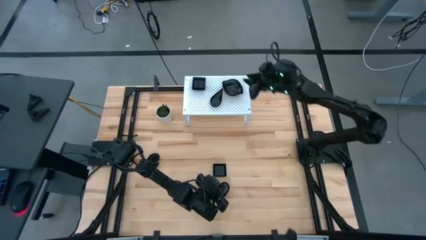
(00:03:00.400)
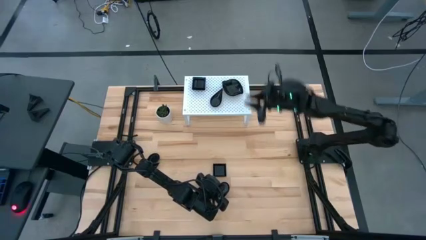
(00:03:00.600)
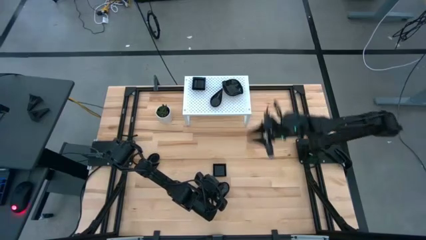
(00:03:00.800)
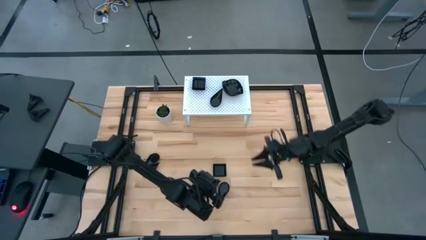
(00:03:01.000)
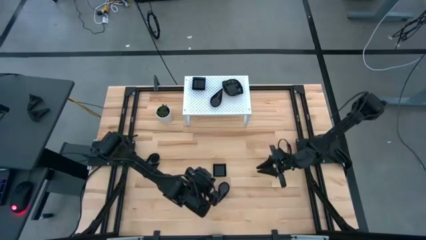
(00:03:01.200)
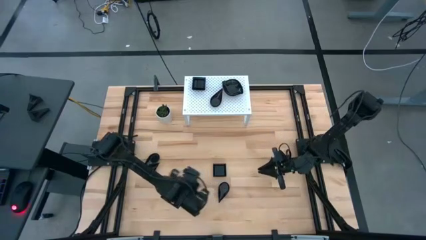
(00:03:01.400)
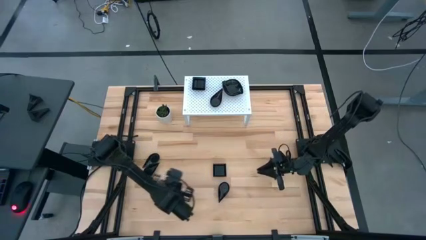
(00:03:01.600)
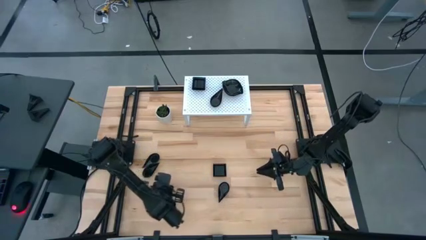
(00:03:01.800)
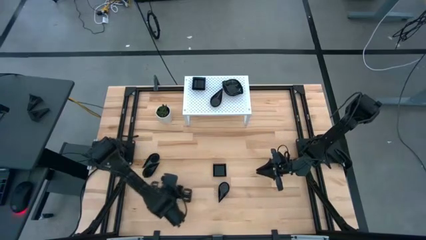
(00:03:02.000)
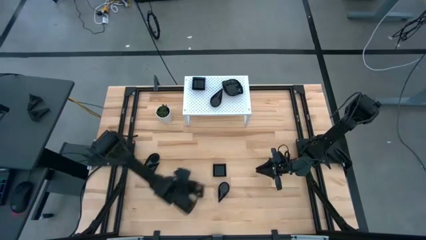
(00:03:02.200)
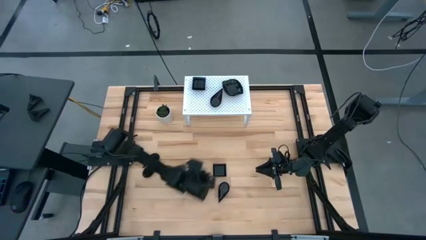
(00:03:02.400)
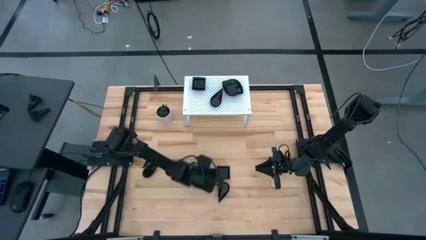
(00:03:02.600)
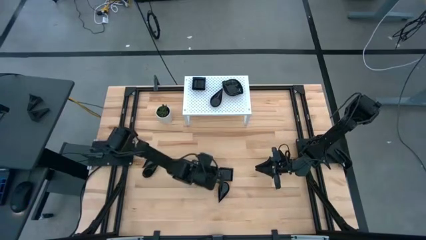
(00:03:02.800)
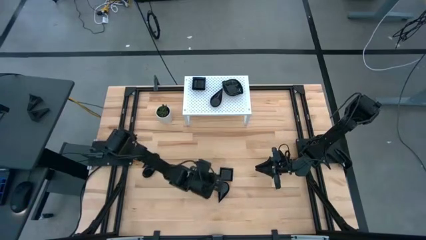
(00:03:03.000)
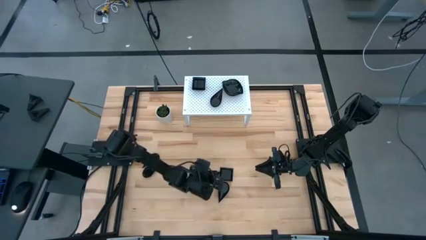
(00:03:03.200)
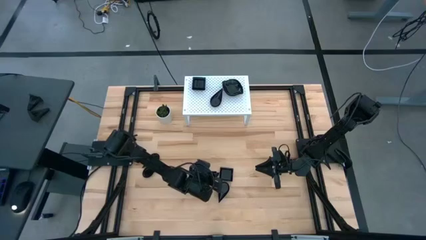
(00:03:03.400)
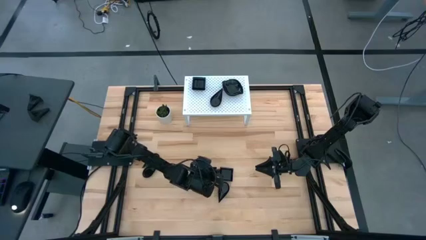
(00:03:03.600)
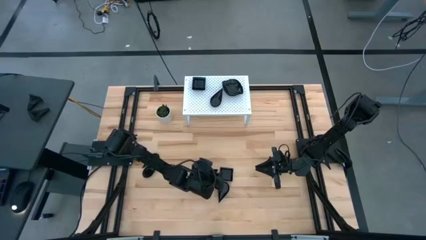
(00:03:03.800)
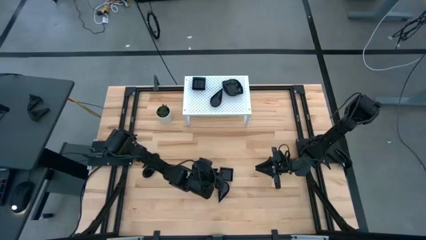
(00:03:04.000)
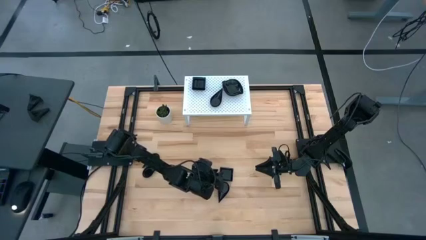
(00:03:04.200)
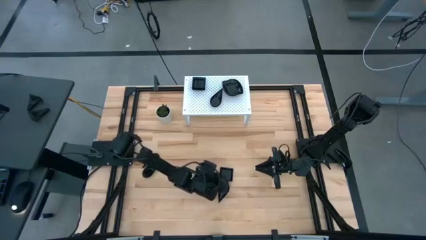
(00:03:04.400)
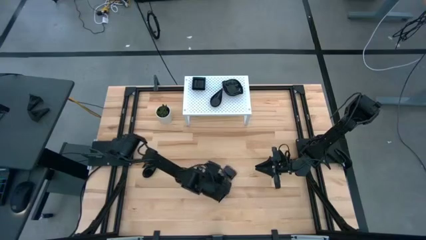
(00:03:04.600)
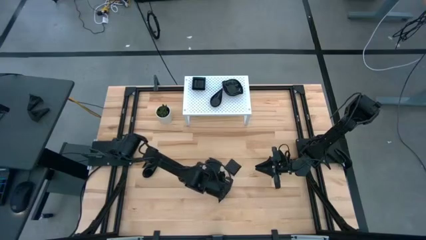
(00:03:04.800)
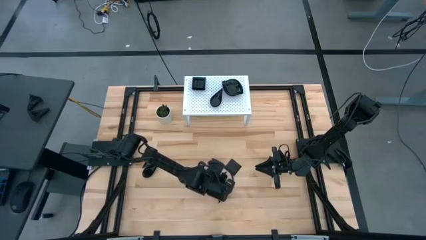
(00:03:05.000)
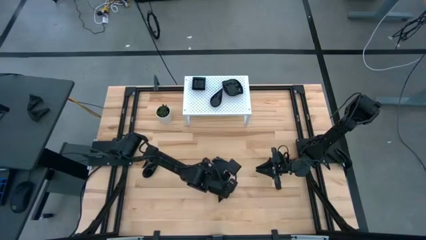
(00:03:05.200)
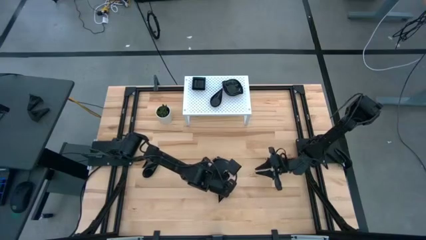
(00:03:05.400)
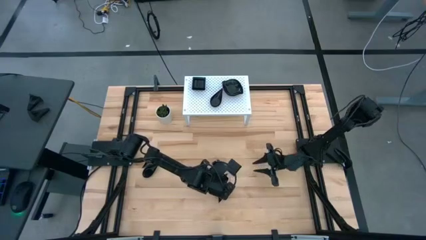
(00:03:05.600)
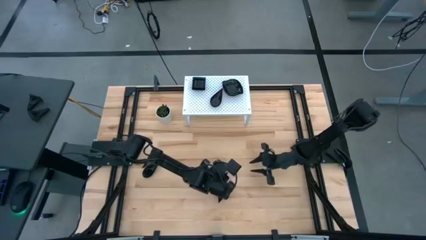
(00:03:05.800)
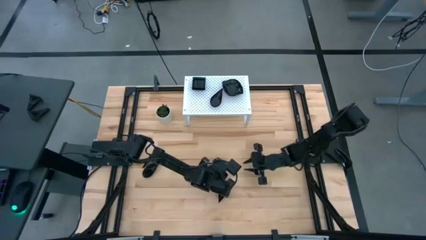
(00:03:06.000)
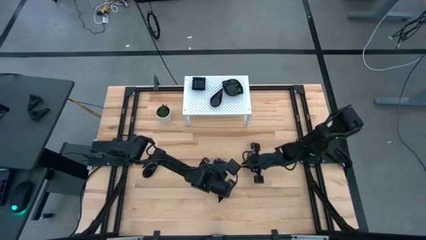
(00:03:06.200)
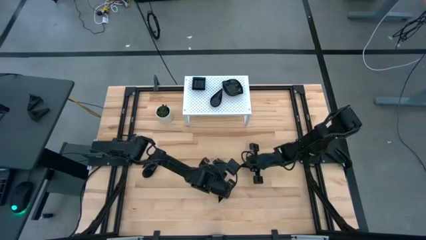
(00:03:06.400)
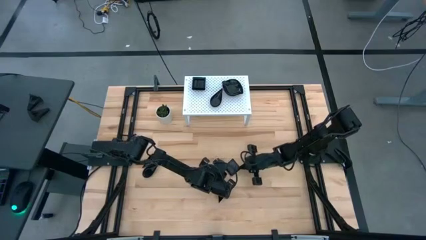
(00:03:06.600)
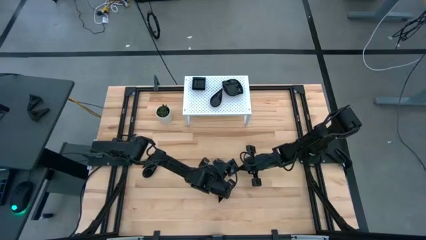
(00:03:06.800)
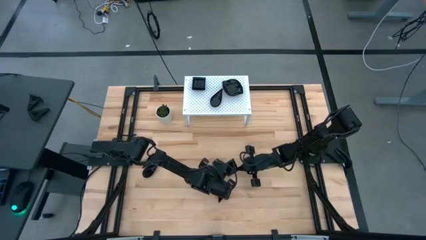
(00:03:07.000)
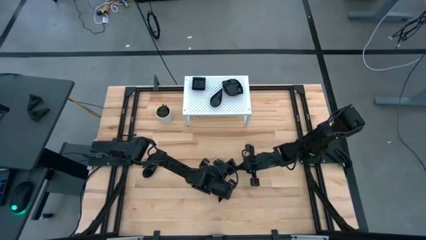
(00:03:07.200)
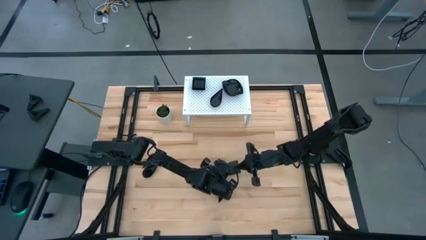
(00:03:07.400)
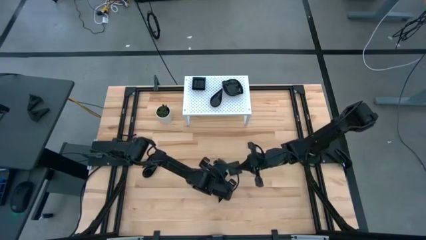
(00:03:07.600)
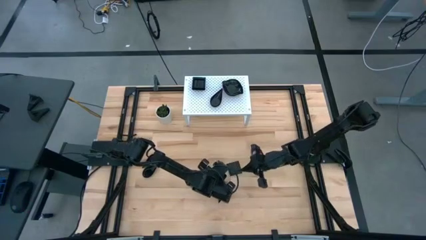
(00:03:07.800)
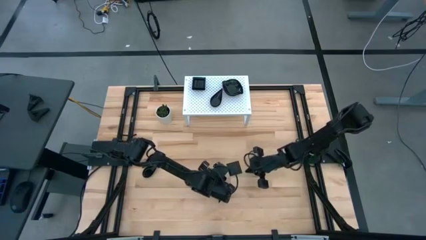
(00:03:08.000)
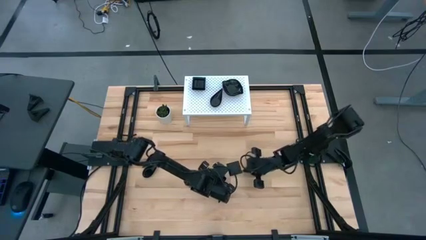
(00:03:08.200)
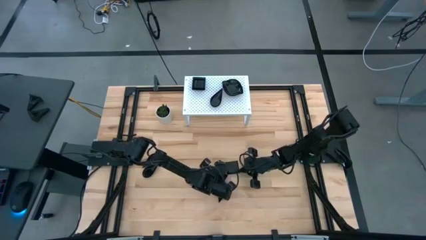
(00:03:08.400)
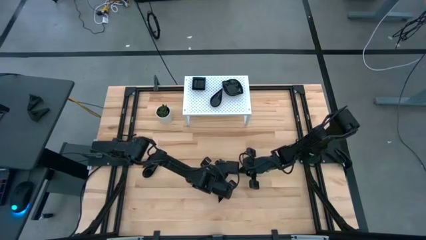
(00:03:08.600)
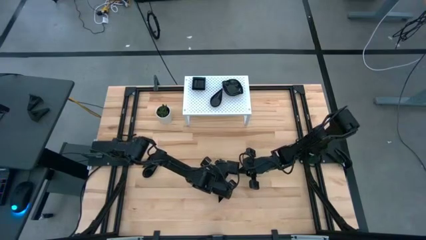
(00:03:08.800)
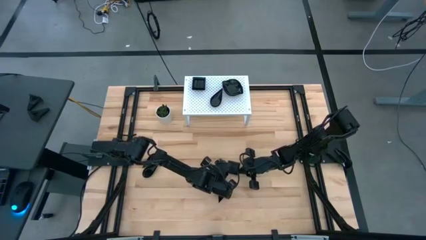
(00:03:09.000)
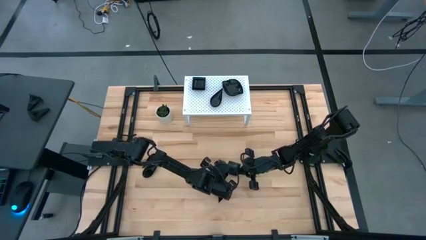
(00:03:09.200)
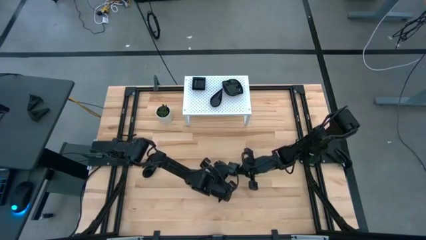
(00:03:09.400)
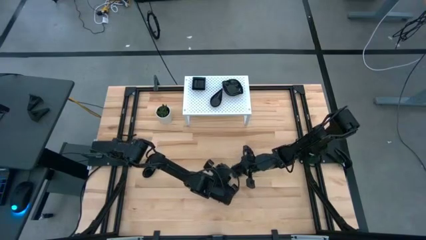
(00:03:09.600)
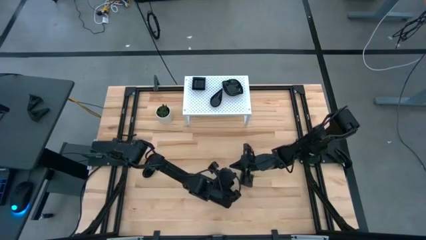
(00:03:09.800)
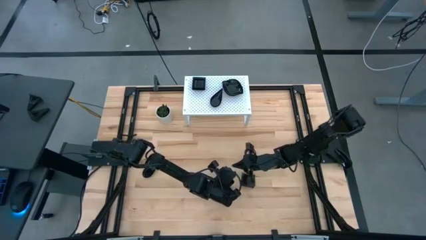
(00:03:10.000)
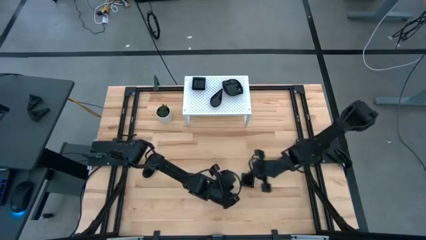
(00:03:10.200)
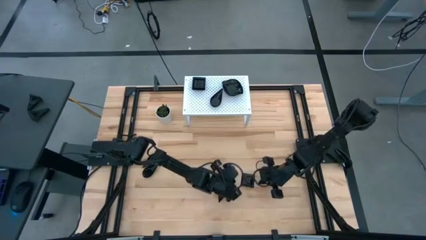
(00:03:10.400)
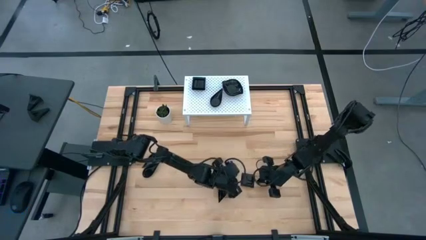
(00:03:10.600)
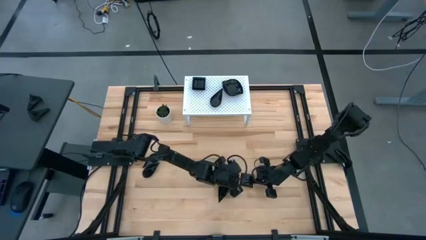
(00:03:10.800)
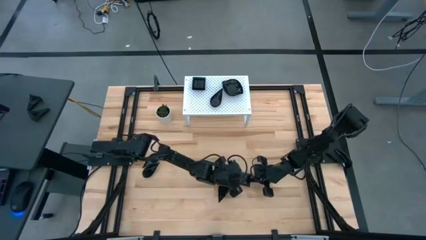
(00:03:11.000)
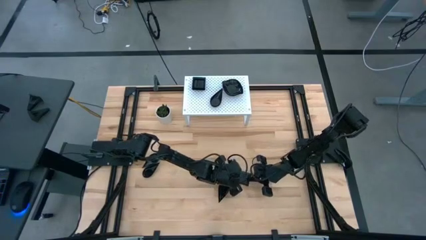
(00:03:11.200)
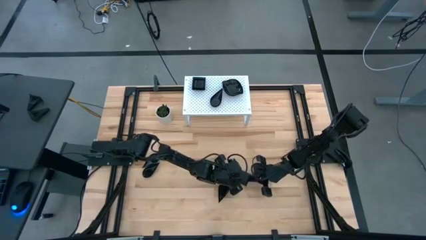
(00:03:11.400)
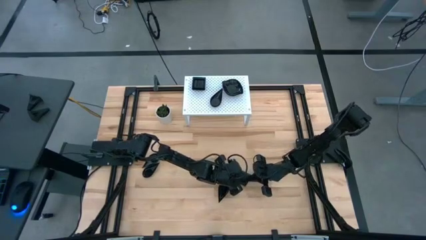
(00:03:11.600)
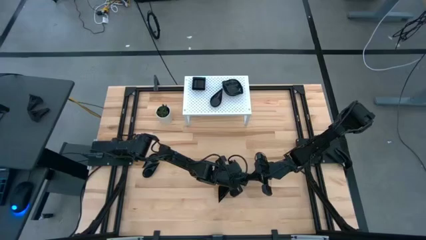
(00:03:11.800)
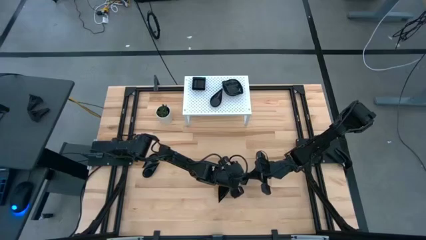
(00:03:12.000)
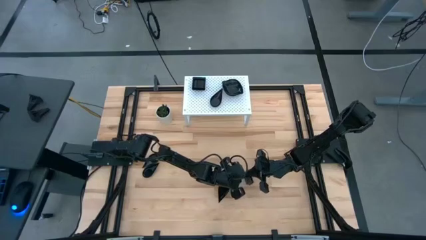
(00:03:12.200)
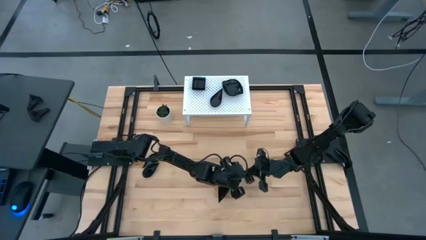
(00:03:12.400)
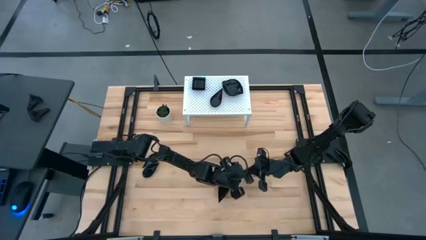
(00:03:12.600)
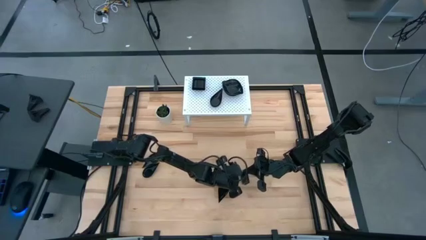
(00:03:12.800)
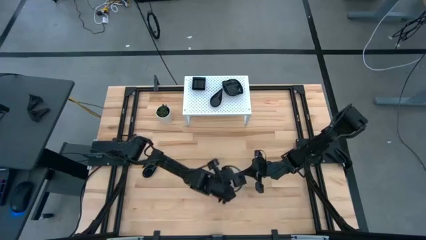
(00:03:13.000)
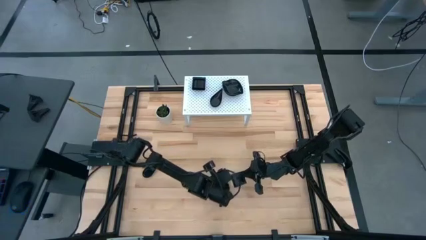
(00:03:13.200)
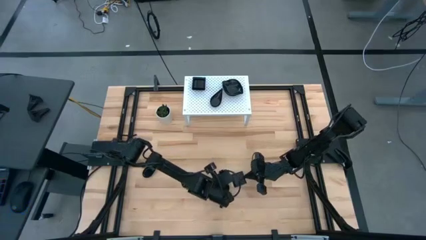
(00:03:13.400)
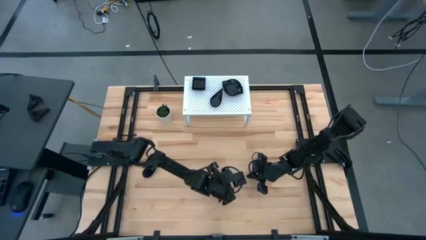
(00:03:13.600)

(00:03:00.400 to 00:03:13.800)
Task: Pick & Place Mini shaped plates
Stack the black plate on top of the black plate on the shelf

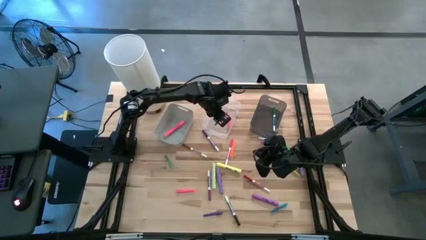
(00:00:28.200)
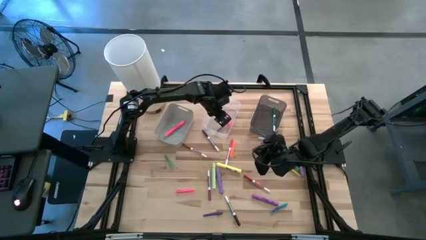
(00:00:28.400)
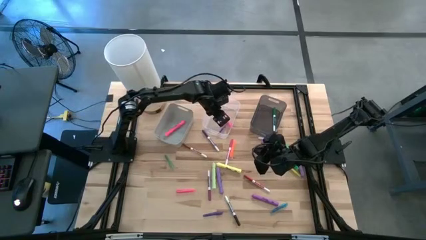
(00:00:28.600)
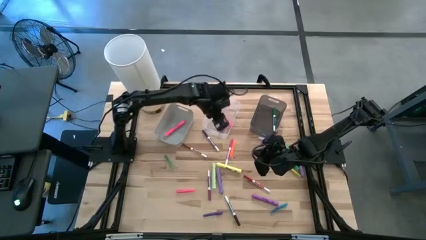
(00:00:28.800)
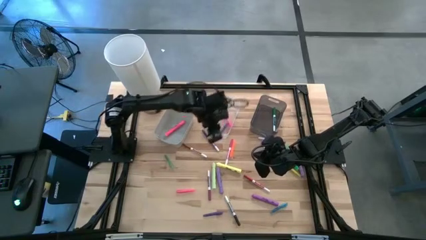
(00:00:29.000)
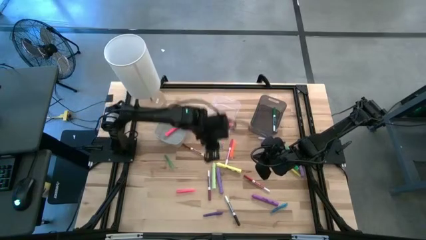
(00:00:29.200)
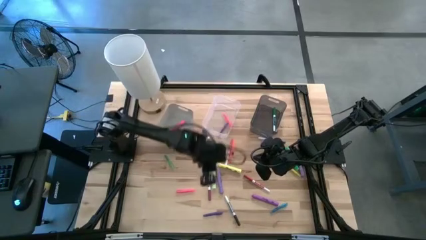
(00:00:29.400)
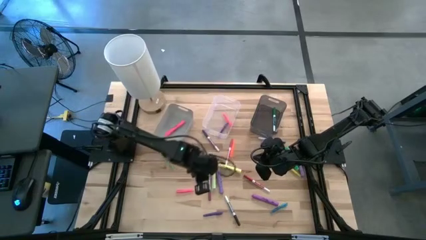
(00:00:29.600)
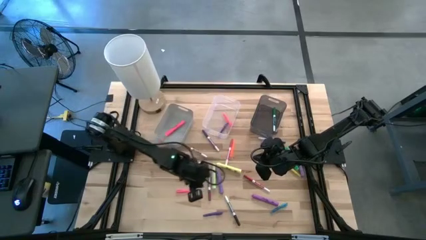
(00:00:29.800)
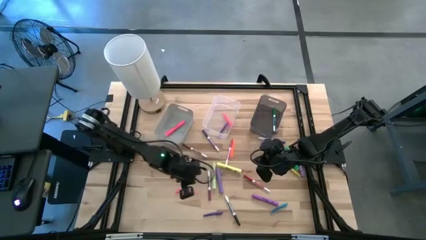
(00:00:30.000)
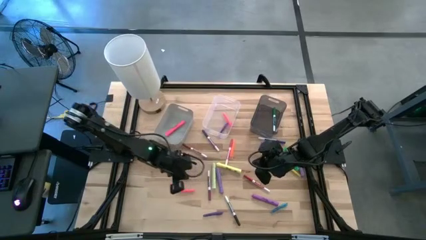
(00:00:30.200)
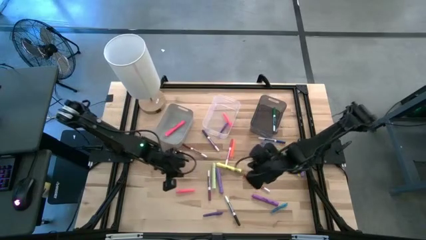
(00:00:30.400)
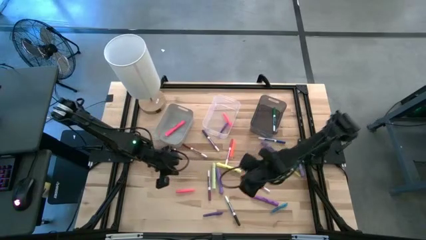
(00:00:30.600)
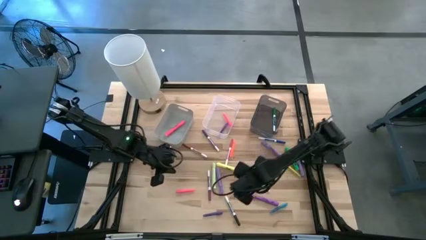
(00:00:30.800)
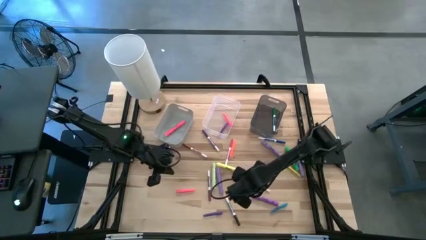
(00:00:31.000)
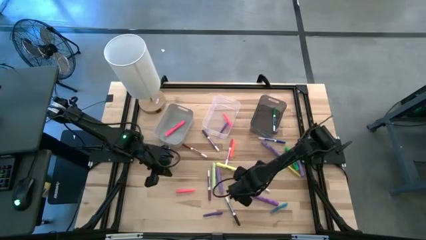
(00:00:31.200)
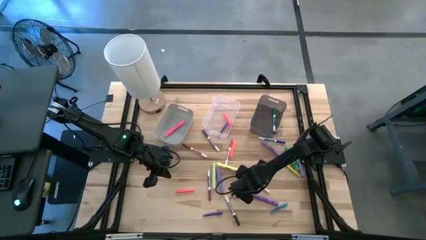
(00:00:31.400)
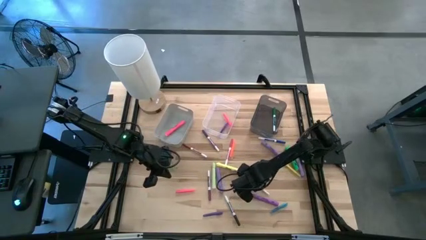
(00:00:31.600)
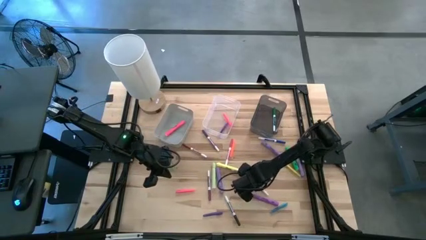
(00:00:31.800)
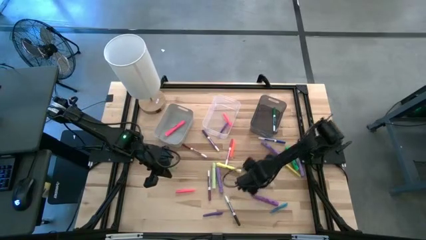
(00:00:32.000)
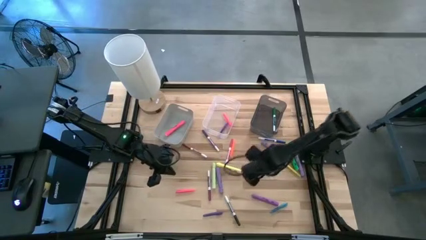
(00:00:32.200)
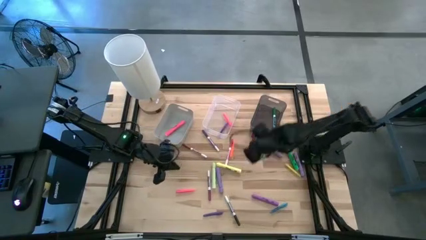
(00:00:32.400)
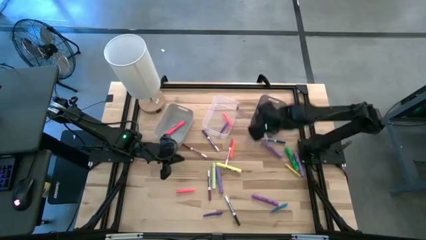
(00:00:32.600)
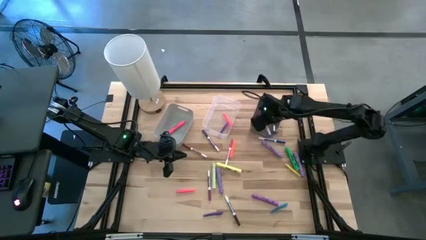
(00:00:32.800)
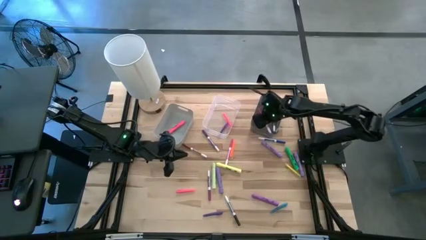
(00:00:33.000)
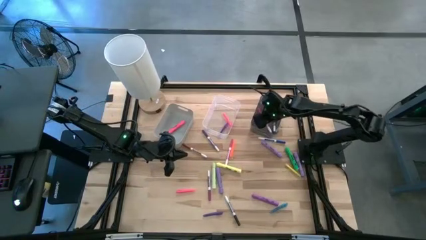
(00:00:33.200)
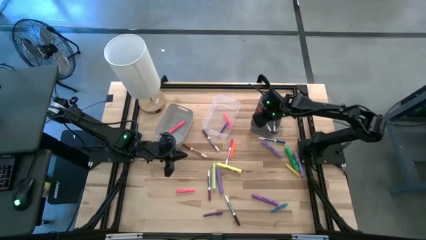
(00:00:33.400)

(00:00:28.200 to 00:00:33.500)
Task: Pick & Place Markers
Put the red marker into the black bin
